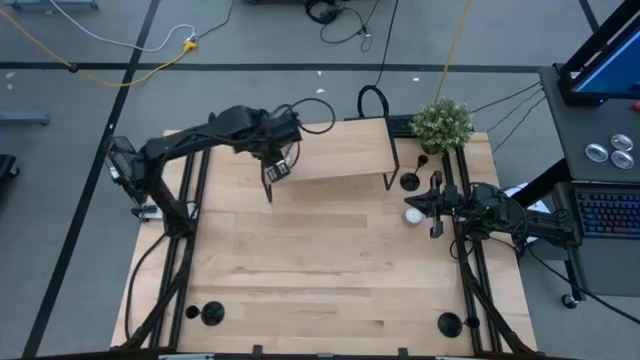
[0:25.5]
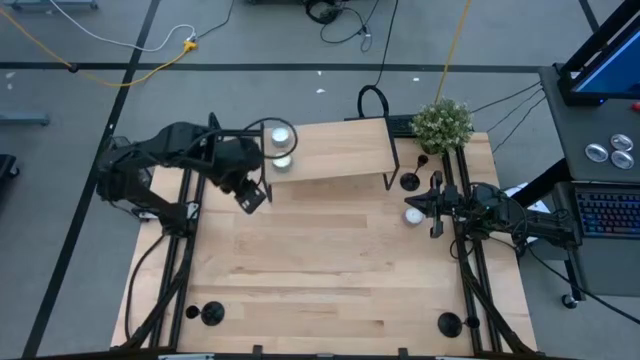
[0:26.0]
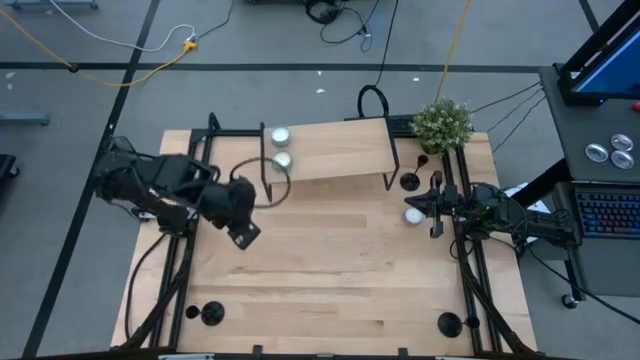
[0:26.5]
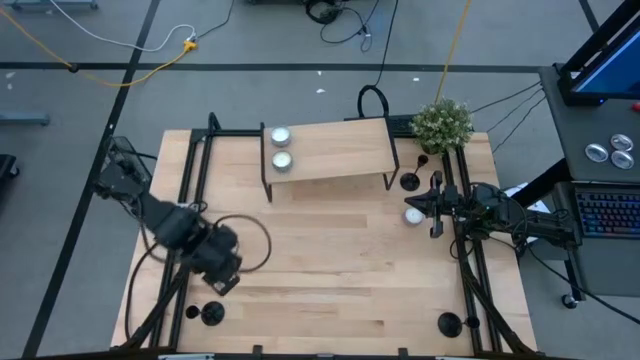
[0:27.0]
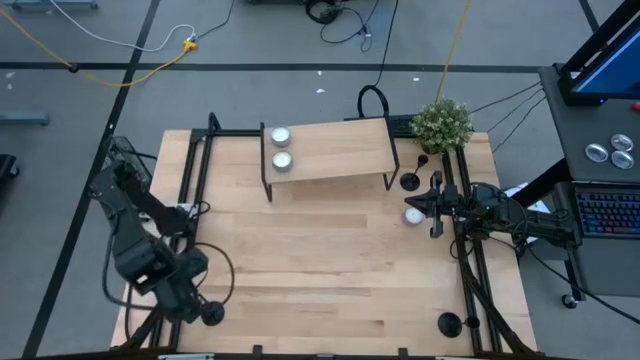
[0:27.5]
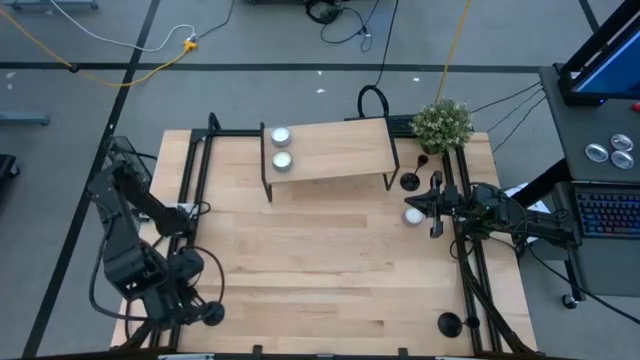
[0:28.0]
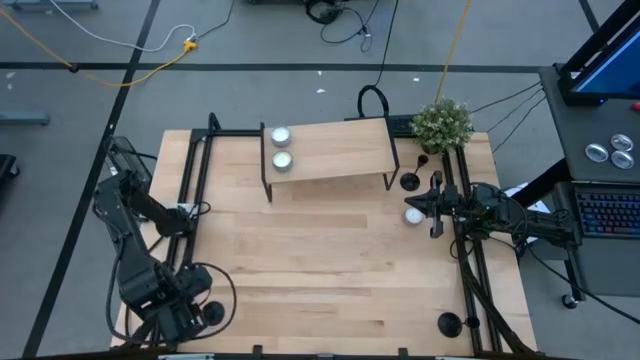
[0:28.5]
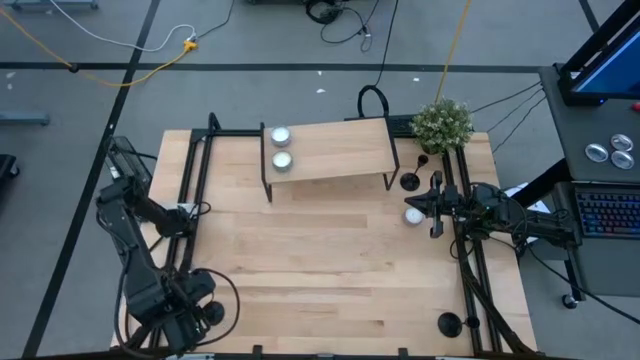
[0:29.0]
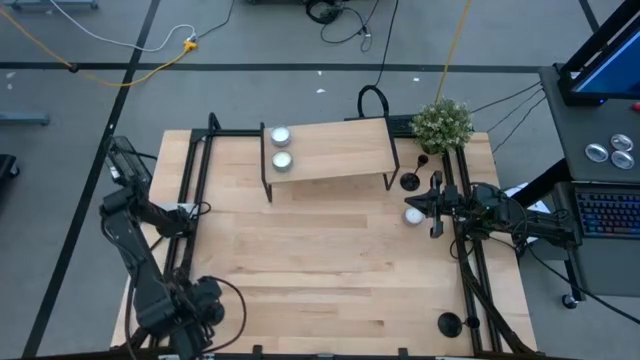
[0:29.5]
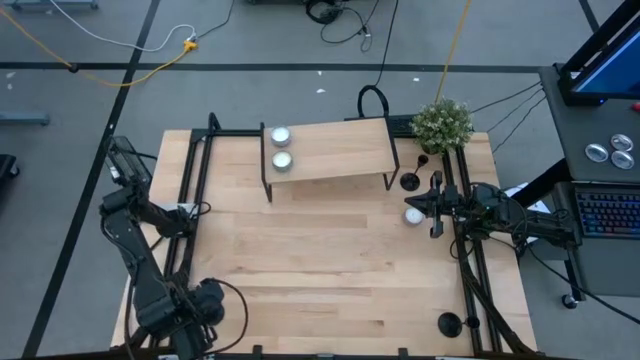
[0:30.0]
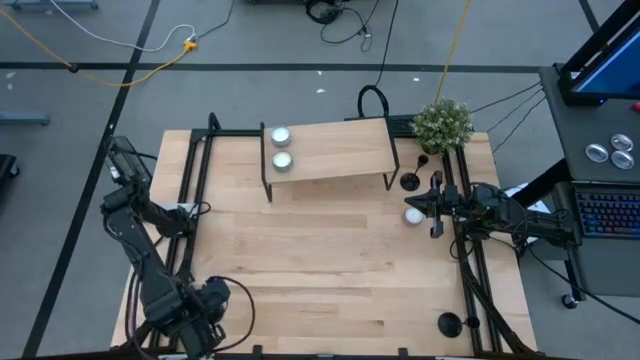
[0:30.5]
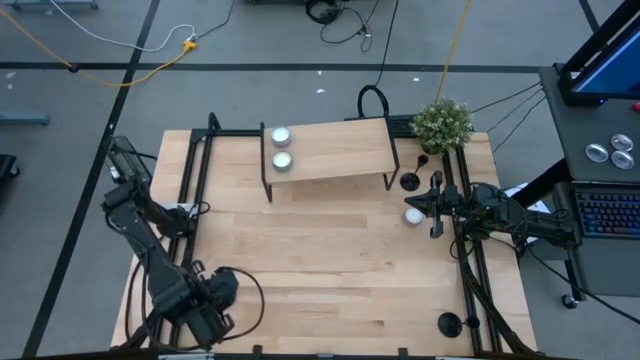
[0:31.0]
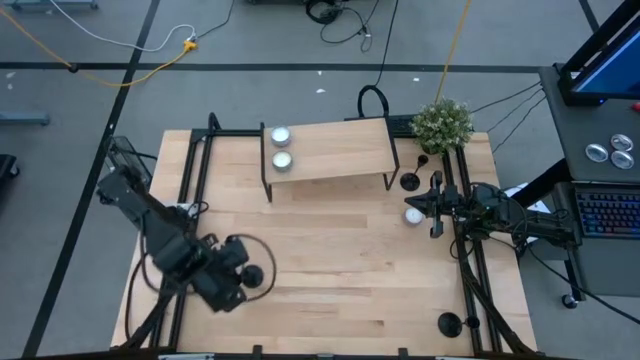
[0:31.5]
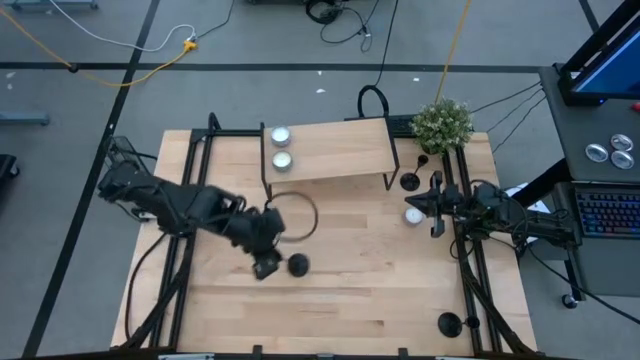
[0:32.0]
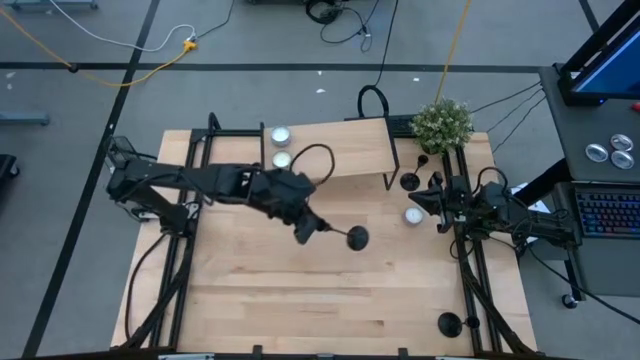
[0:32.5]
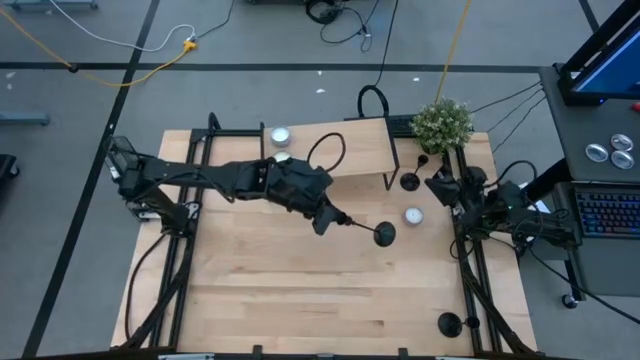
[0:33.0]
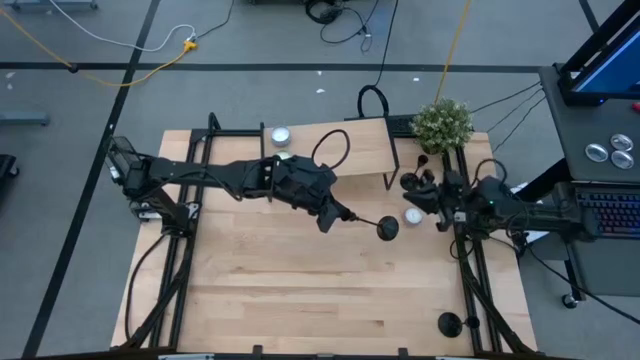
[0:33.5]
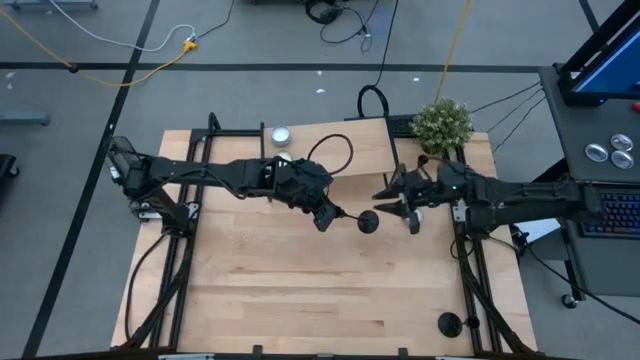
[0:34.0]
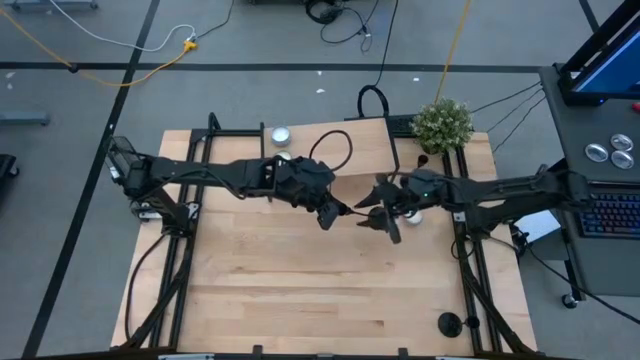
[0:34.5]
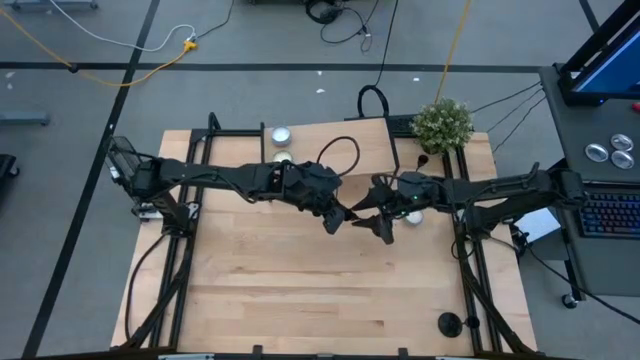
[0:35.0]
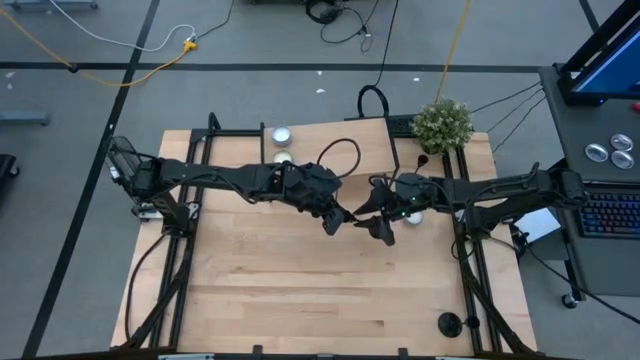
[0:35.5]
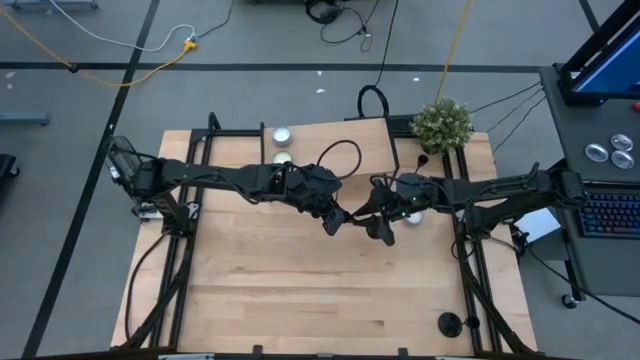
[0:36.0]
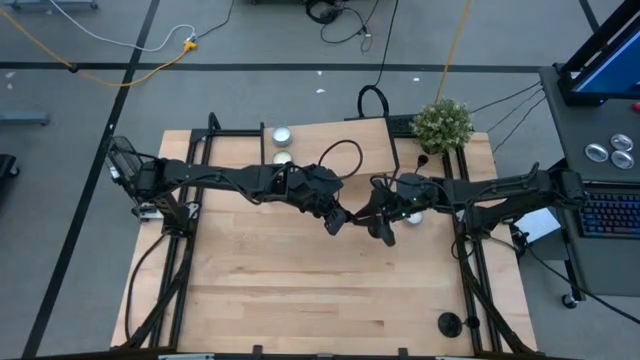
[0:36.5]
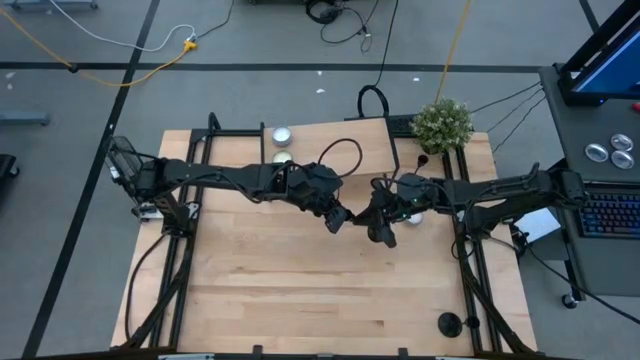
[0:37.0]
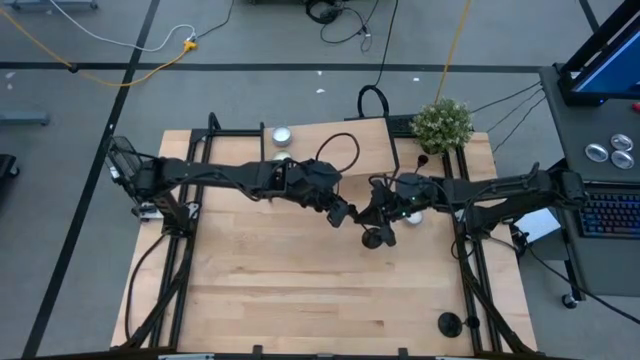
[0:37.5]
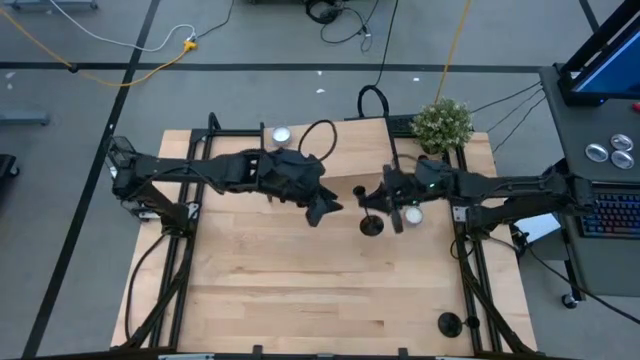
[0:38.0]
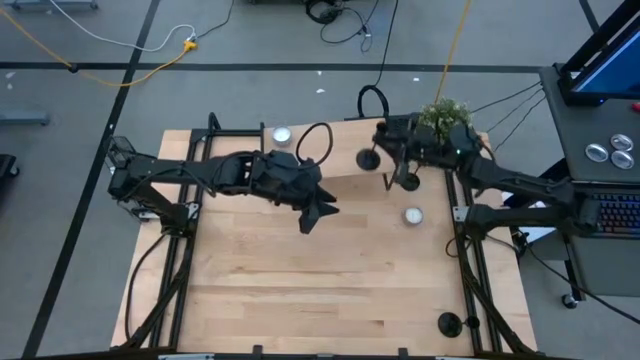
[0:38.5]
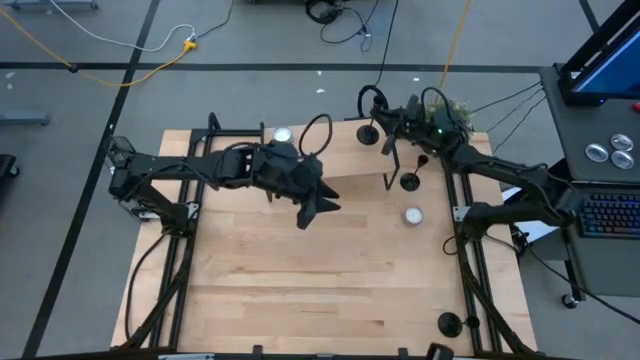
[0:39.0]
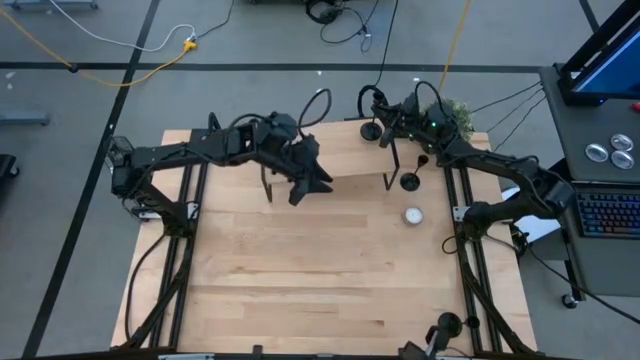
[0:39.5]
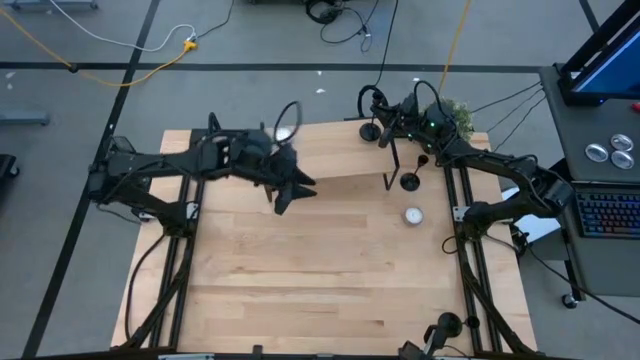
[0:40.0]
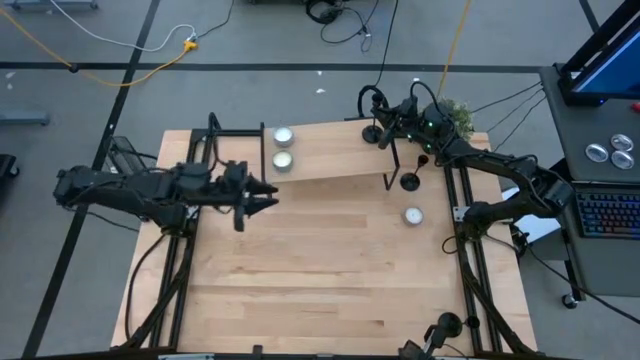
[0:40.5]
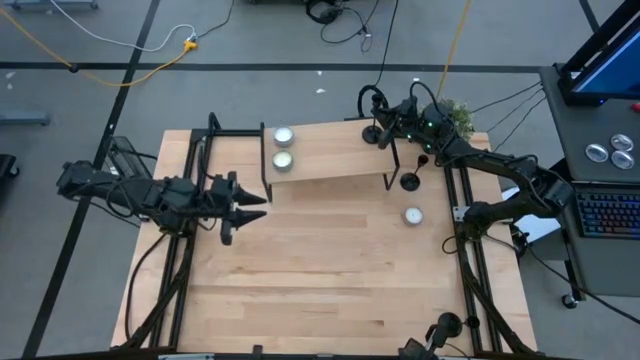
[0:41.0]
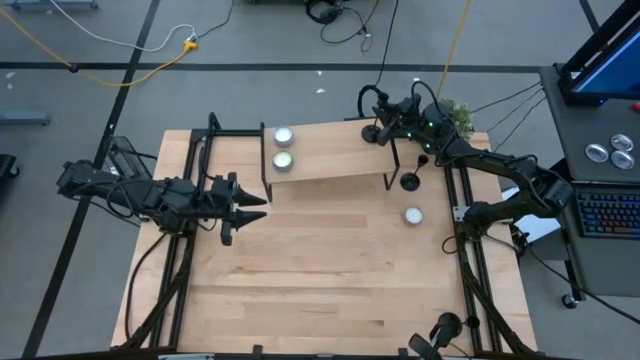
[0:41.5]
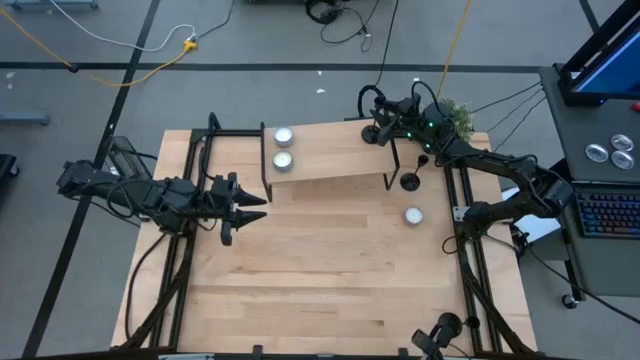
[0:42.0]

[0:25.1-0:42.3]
Task: Pick & Place candle stick holders
Put the bottom left black candle holder on the shelf

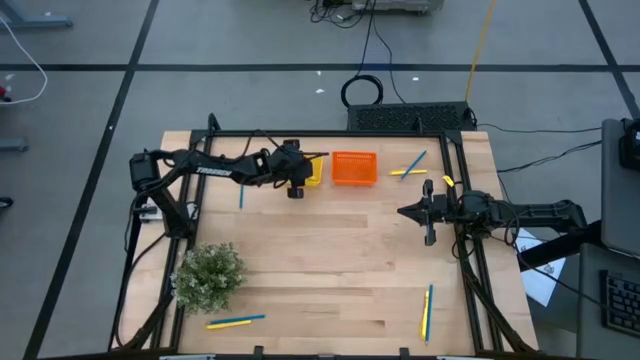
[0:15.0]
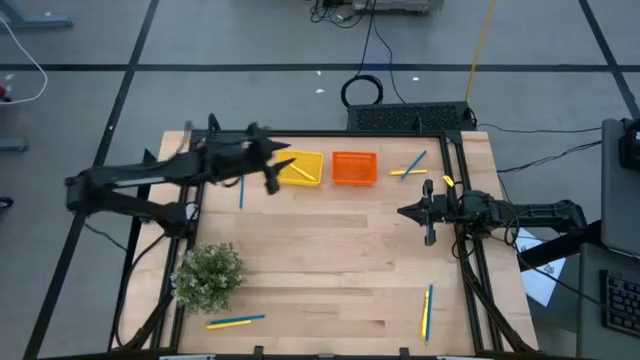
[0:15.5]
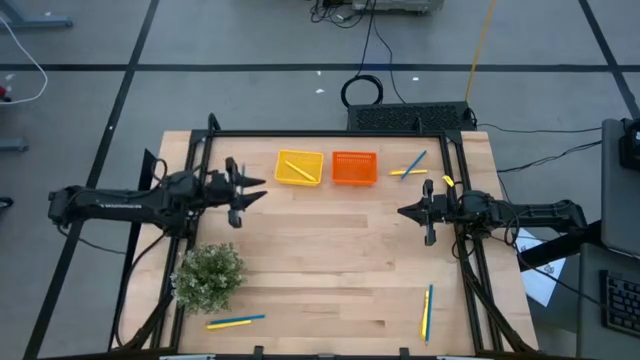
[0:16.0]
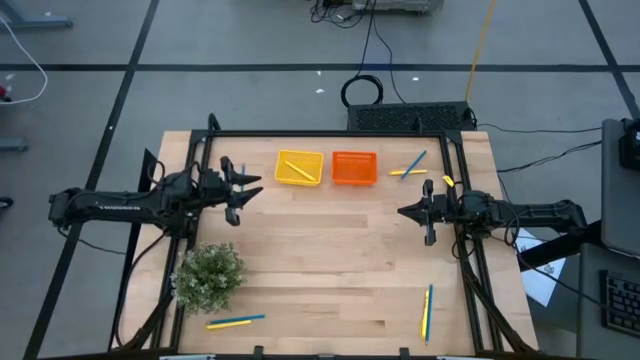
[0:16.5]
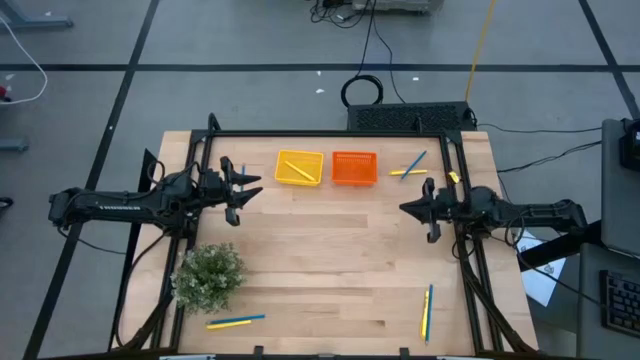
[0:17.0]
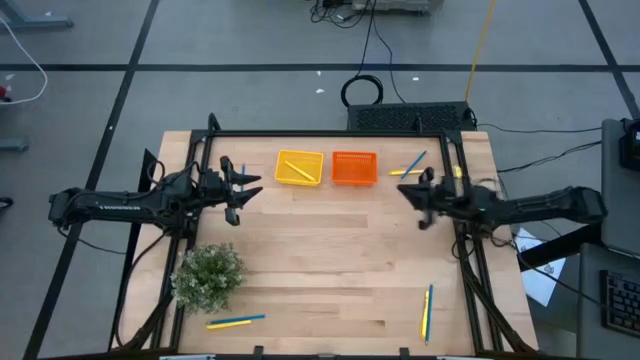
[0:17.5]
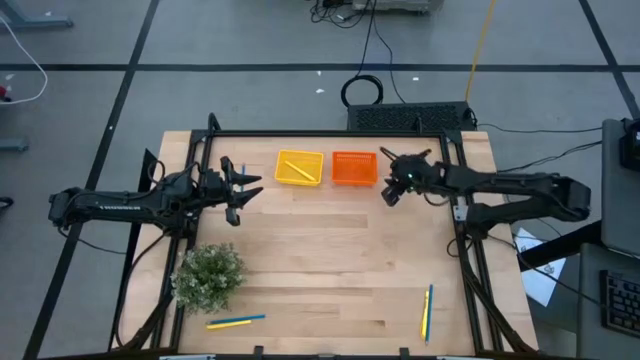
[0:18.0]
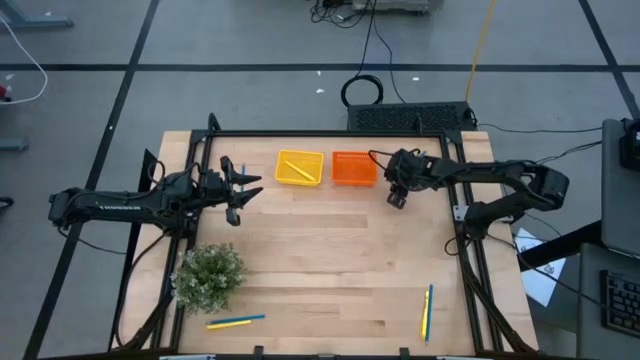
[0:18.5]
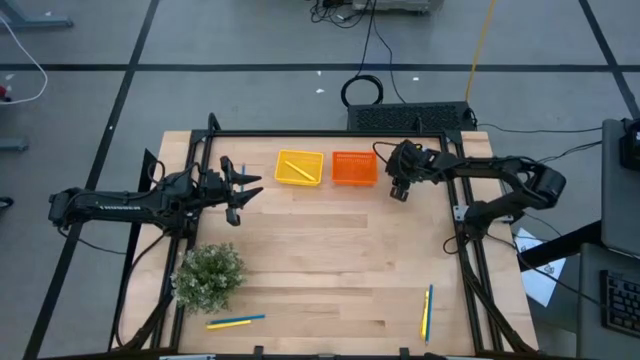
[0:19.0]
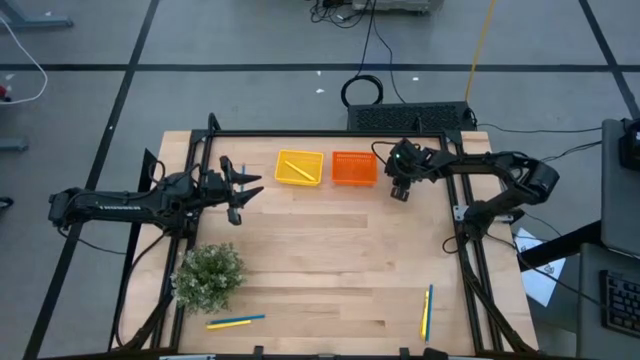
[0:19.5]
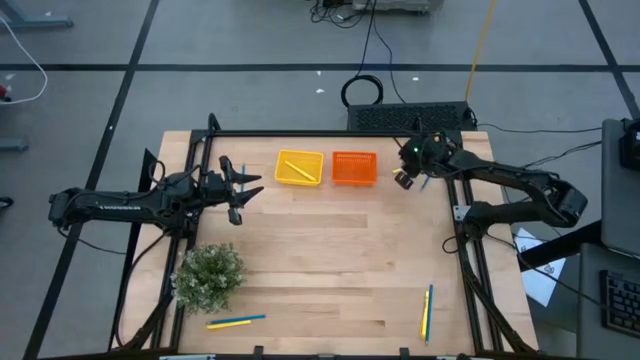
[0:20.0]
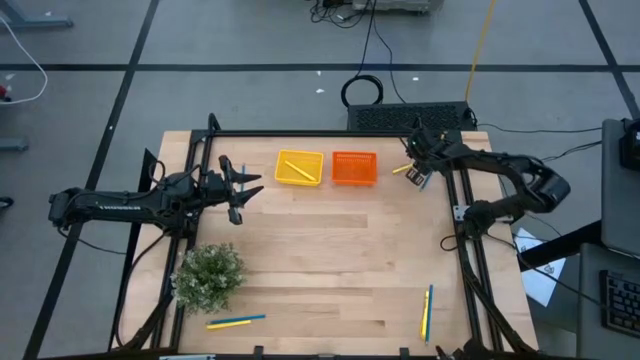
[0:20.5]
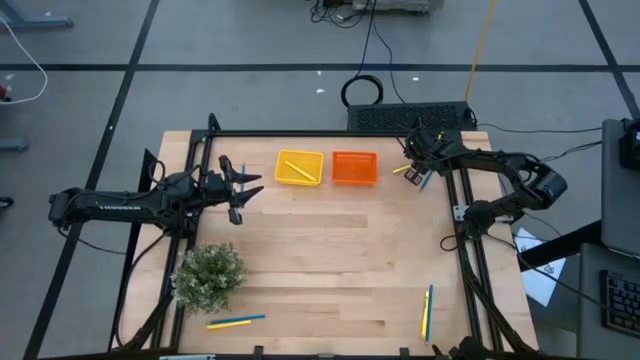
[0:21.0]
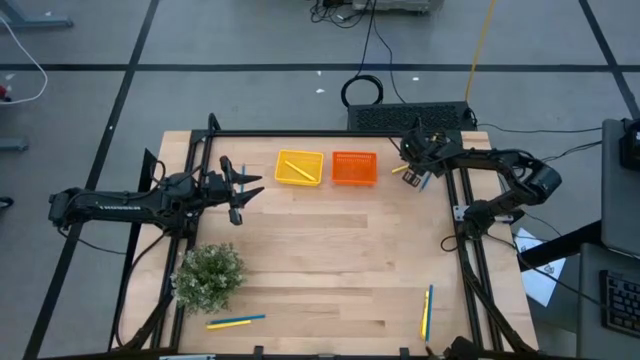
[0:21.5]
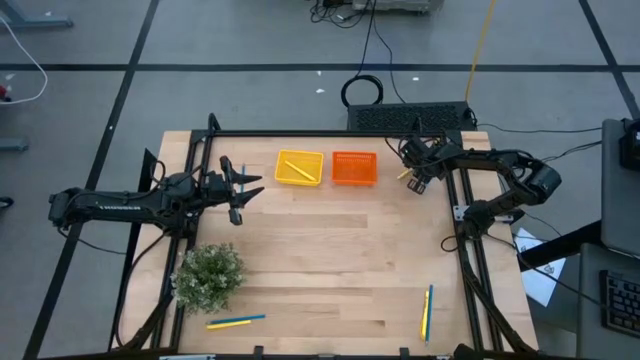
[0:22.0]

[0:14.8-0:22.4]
Task: Sort pens & pencils
Put the top right yellow pen into the yellow bin
